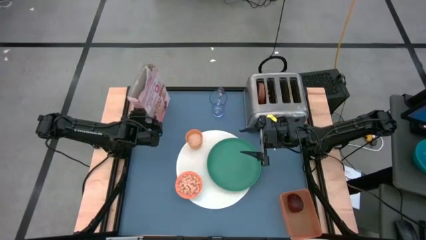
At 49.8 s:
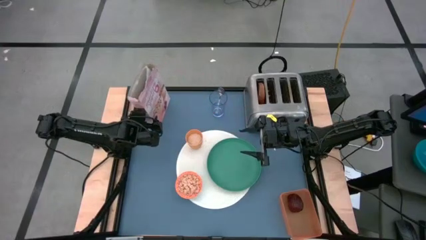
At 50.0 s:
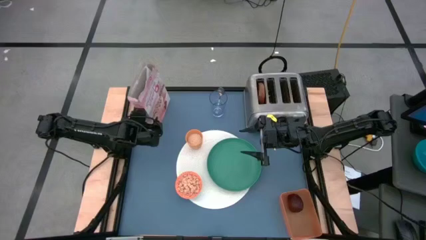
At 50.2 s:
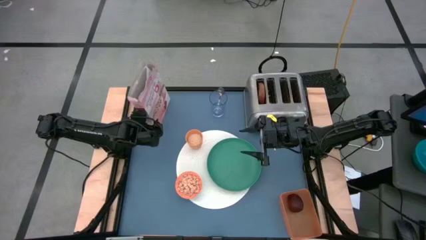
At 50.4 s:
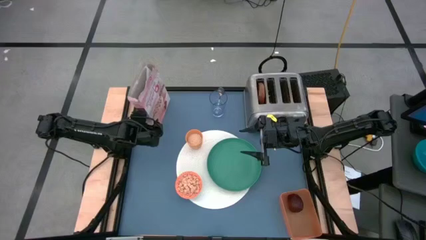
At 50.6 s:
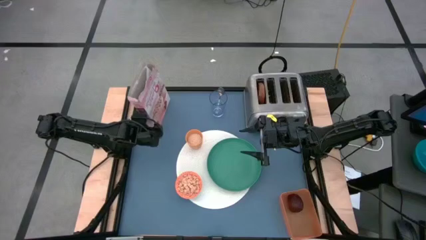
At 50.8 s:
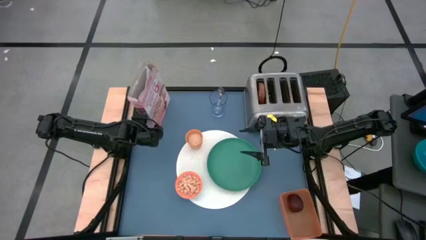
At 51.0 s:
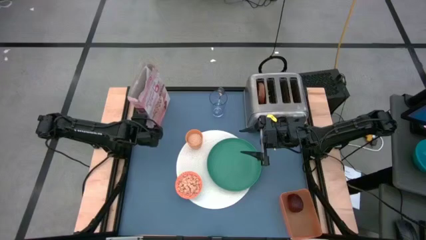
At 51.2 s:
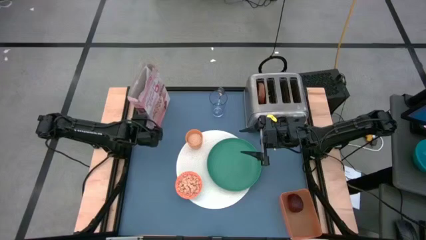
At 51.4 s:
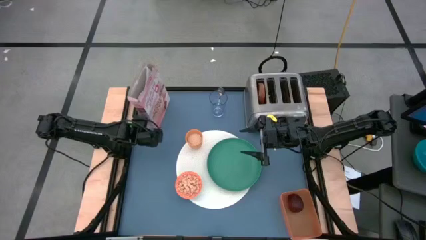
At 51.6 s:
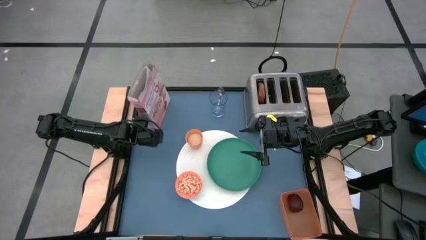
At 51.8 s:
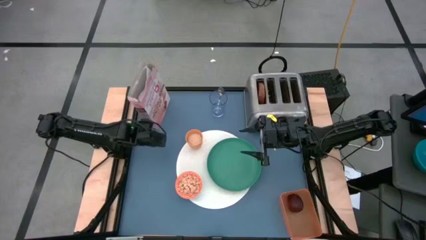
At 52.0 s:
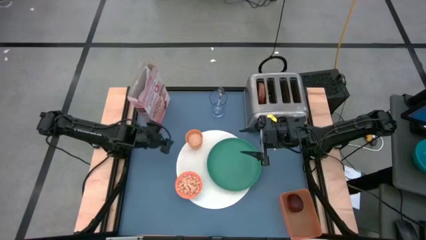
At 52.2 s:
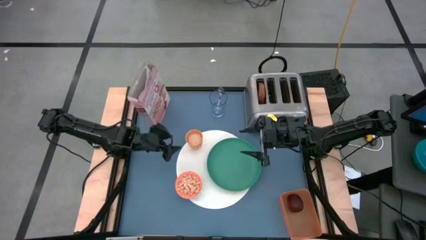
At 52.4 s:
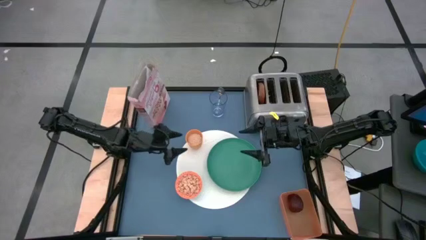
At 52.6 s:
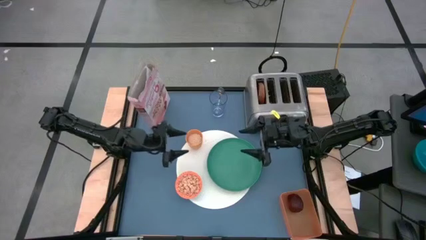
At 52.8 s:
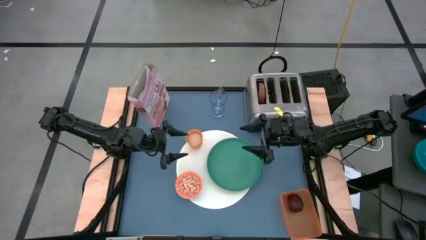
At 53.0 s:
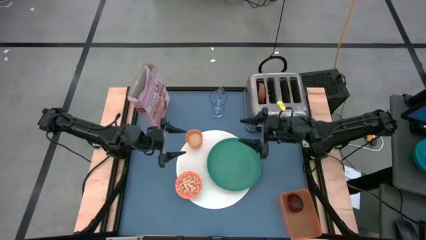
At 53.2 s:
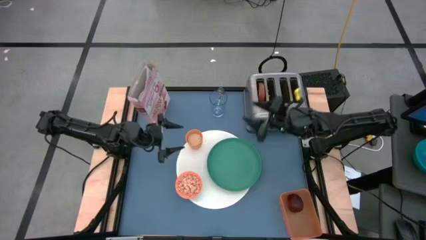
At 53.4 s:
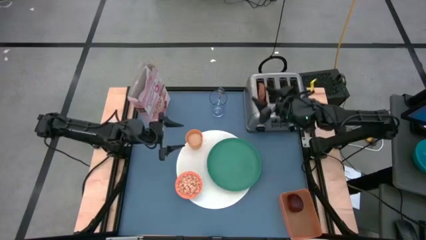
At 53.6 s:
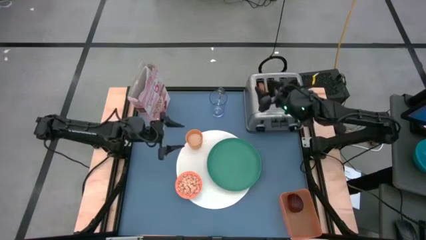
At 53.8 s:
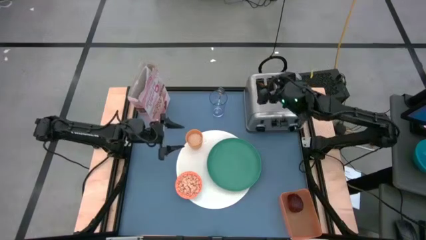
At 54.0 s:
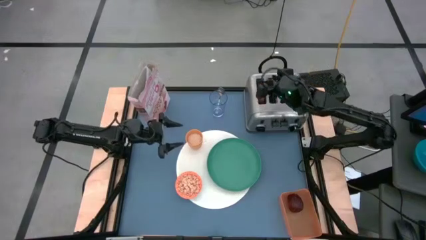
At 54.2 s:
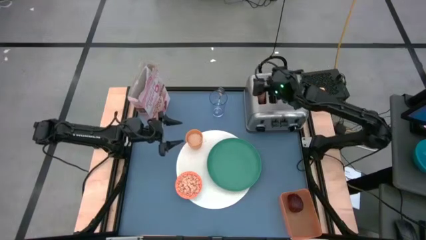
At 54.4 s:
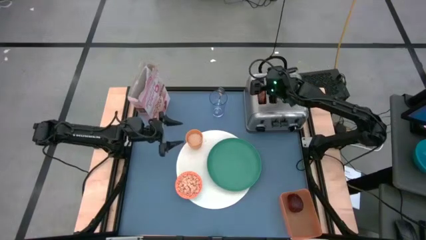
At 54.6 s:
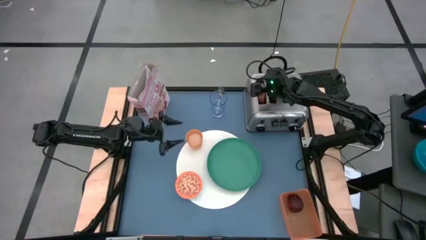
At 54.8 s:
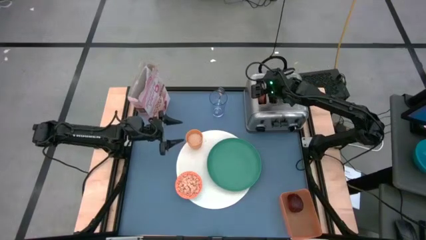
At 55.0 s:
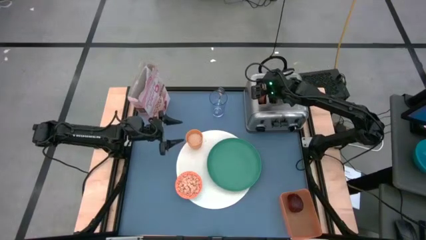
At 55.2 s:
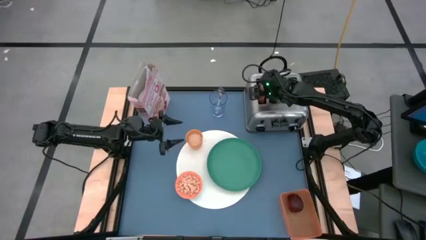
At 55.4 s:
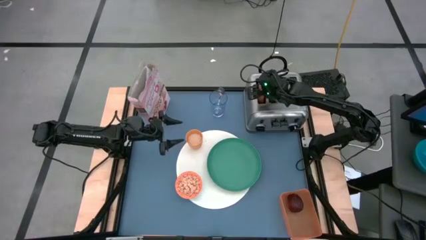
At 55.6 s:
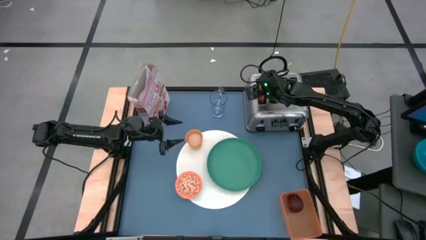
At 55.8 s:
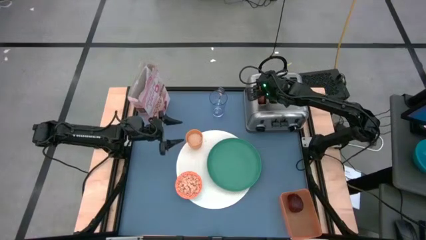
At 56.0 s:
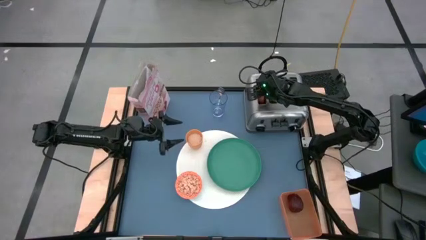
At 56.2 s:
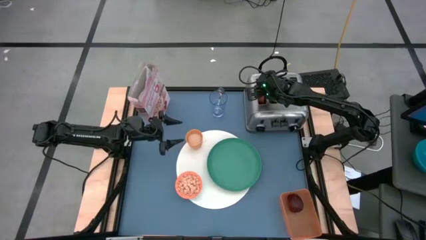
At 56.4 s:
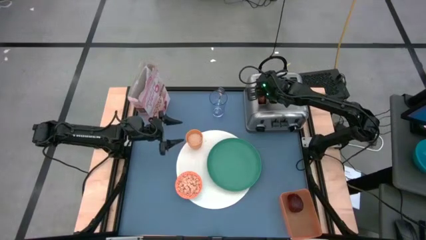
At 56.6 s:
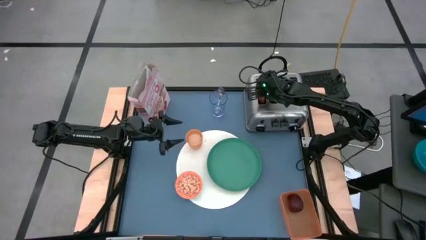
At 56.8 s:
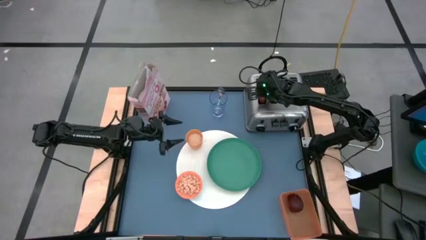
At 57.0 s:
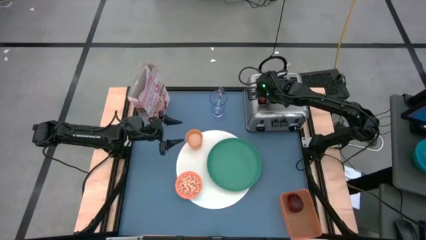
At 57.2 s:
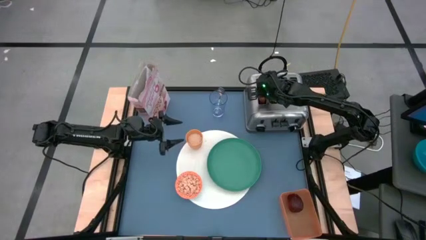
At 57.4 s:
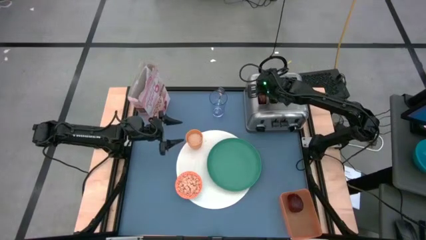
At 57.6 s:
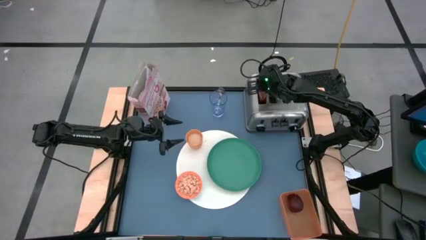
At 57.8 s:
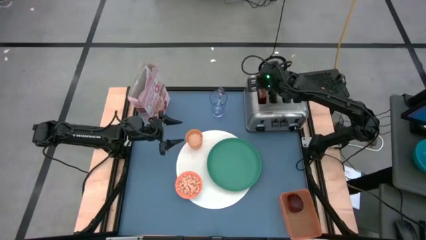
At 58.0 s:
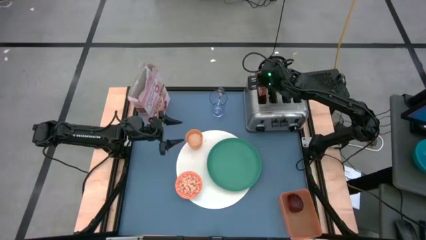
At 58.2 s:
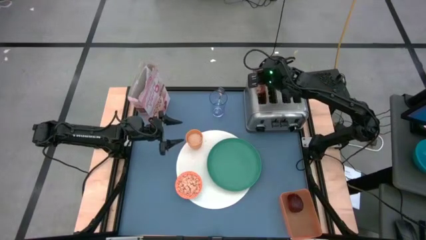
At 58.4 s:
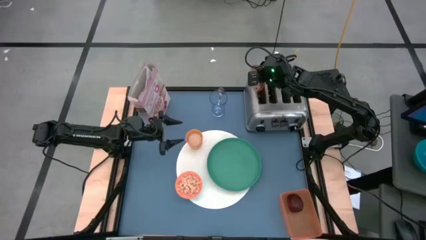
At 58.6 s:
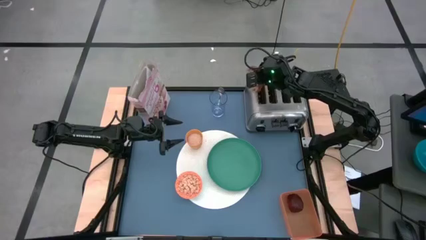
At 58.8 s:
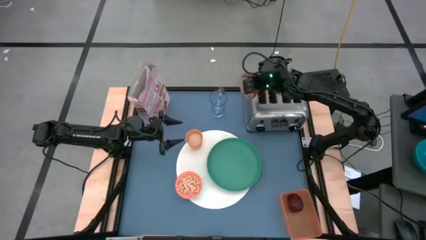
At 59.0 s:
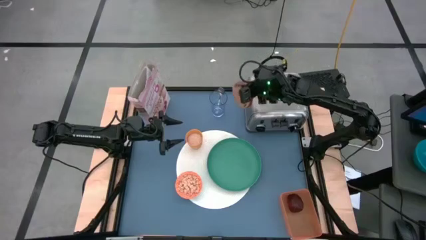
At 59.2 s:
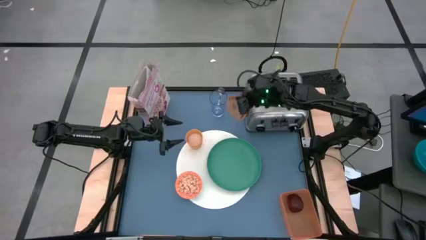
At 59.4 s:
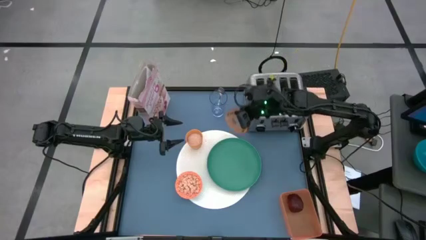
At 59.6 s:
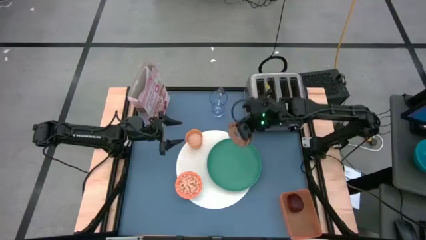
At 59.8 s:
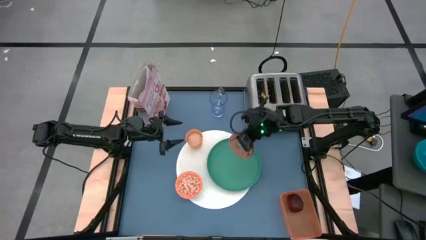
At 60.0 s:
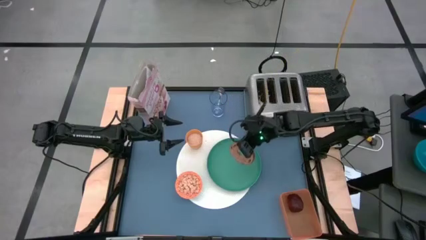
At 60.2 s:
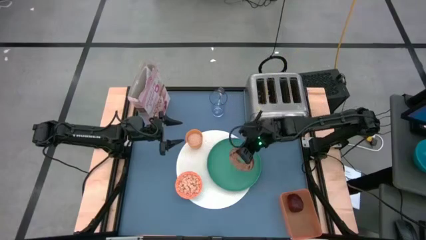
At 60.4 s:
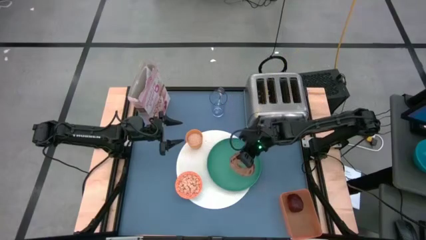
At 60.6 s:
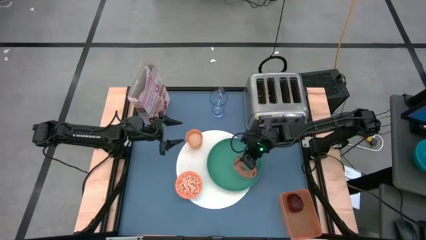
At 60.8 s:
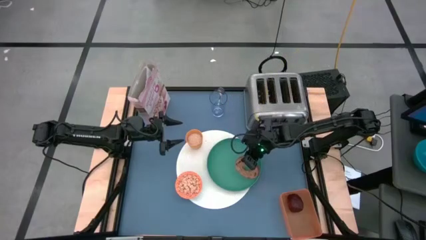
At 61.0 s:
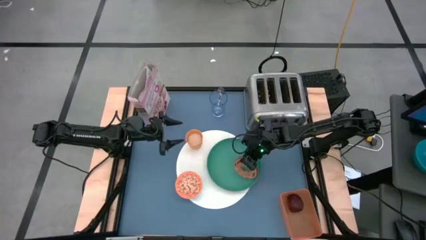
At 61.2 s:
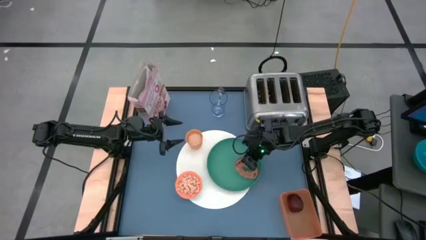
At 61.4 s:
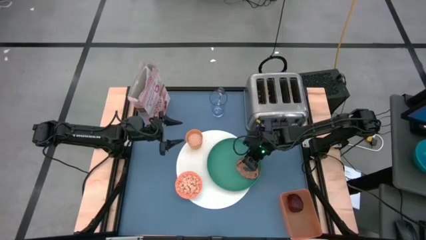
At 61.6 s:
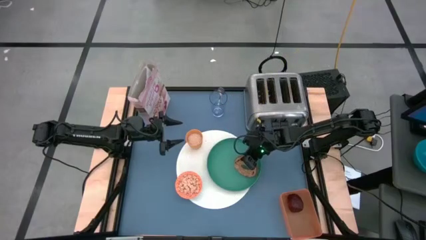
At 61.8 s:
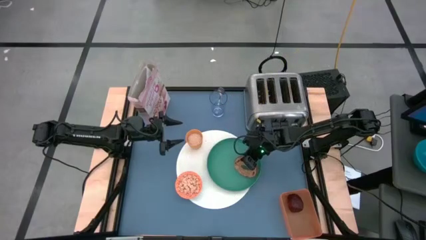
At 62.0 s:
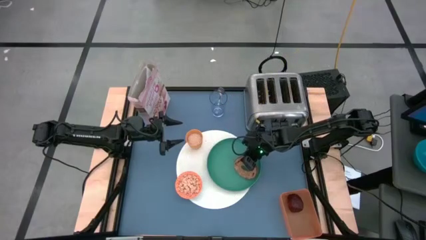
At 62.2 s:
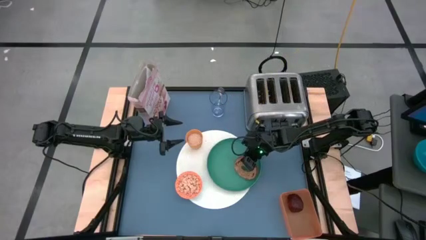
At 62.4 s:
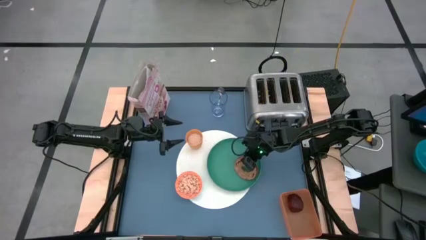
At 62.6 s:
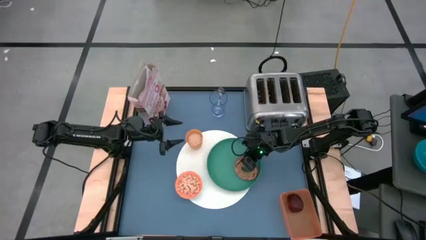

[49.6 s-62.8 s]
Task: Arrange a breakfast setting
Put the bread from the toaster to the green plate
